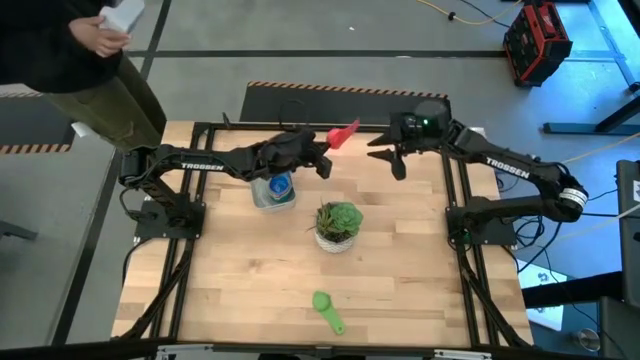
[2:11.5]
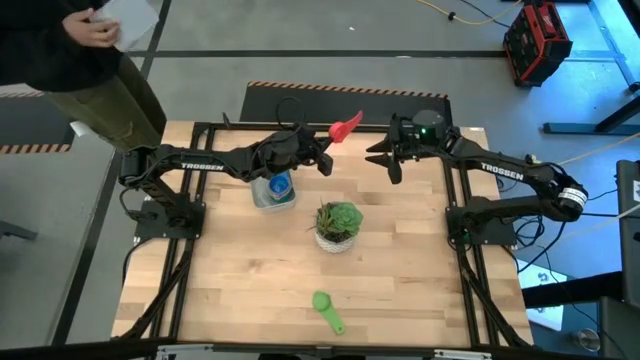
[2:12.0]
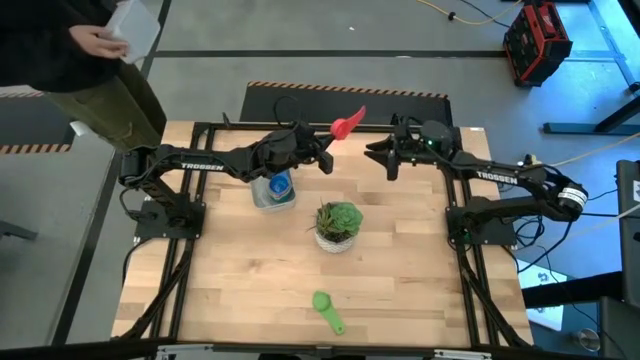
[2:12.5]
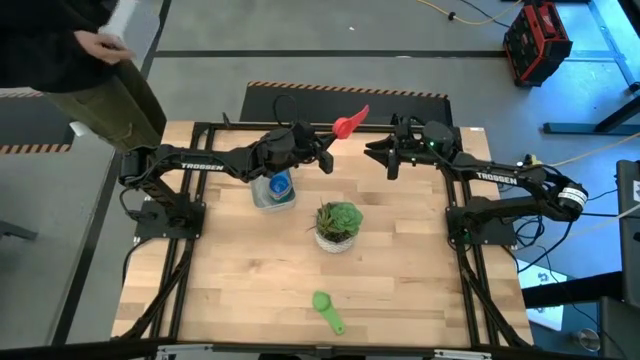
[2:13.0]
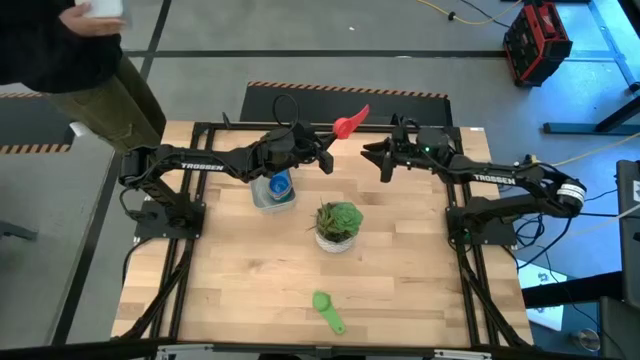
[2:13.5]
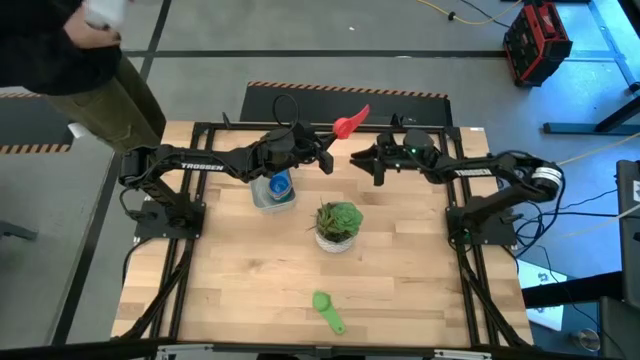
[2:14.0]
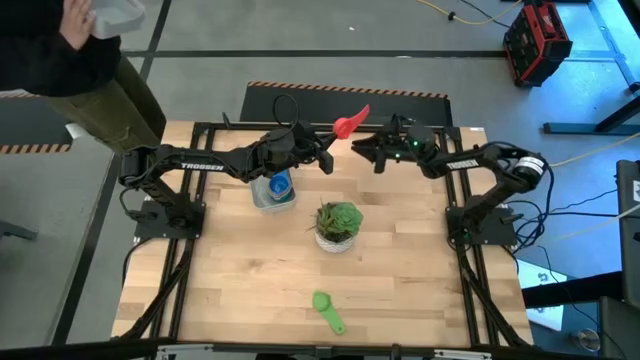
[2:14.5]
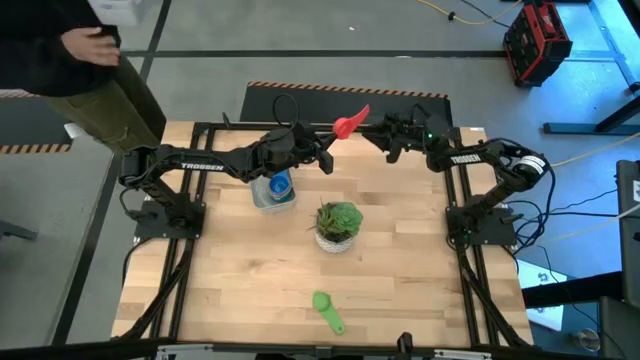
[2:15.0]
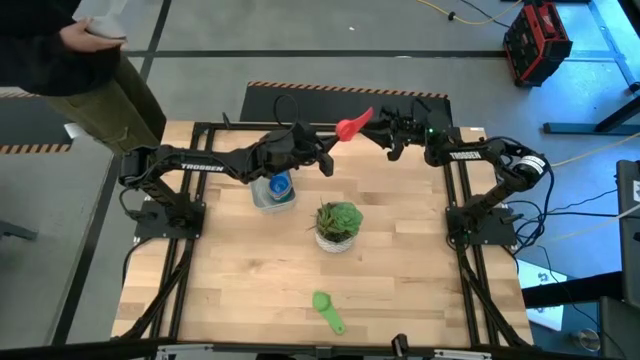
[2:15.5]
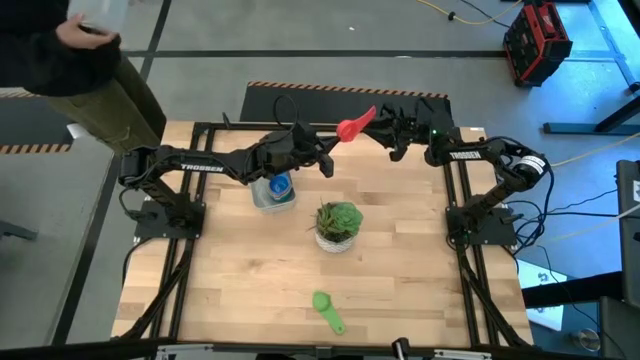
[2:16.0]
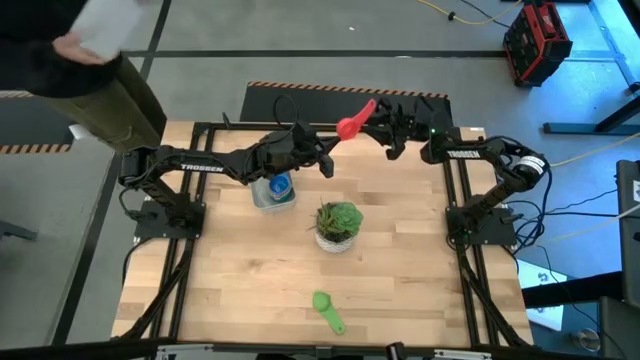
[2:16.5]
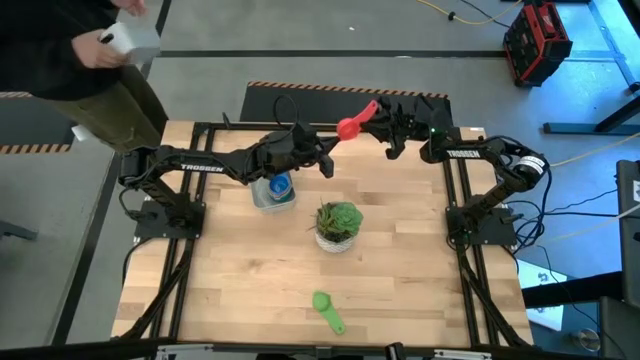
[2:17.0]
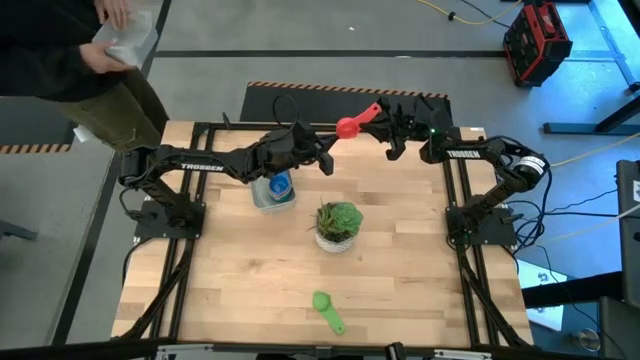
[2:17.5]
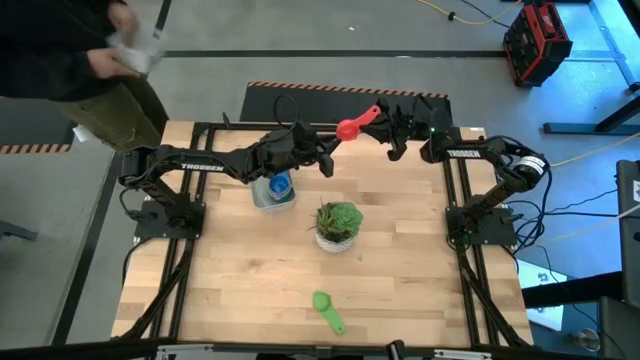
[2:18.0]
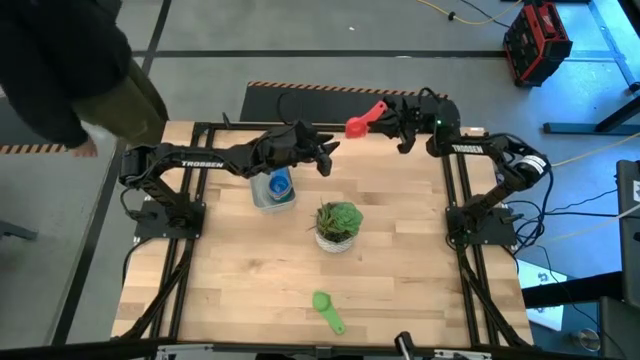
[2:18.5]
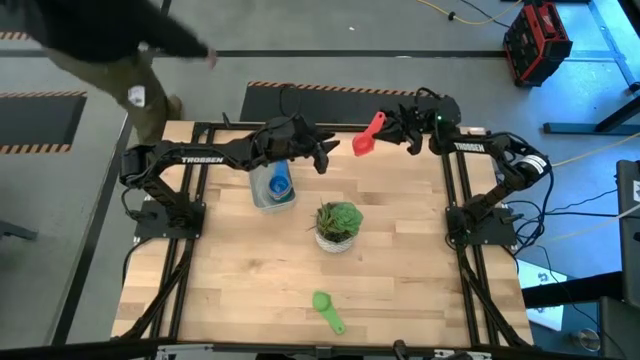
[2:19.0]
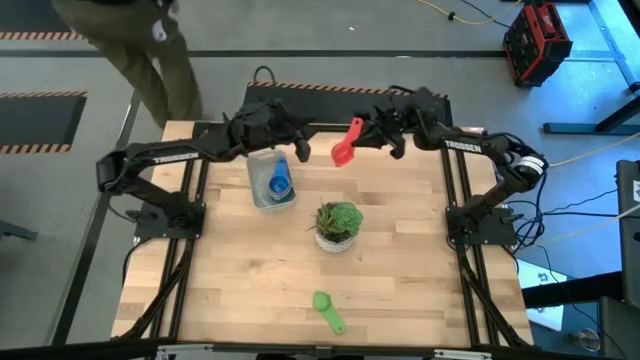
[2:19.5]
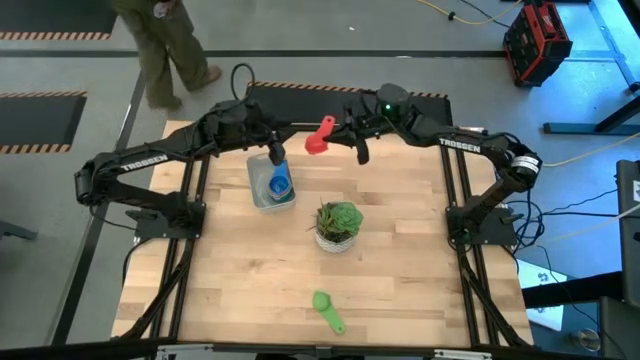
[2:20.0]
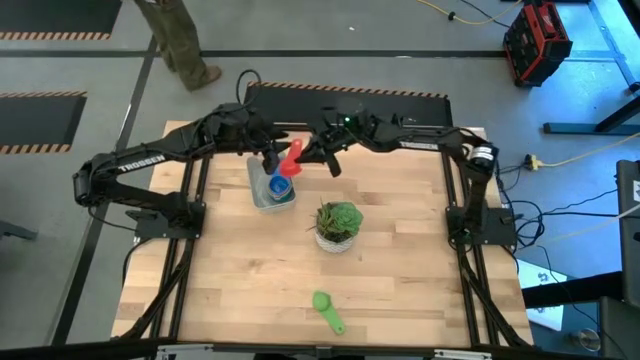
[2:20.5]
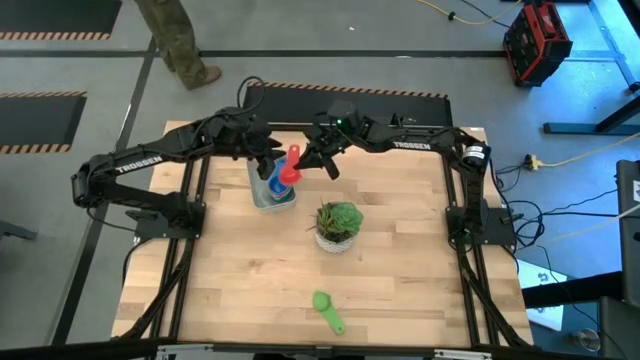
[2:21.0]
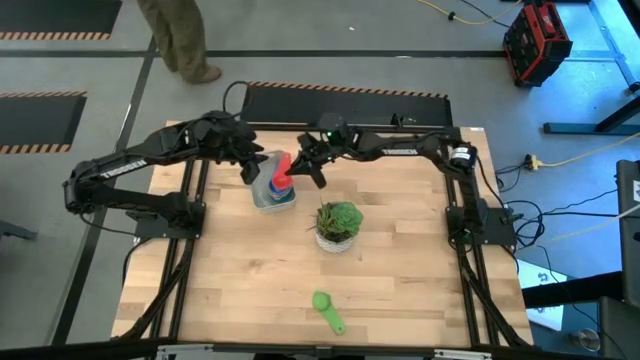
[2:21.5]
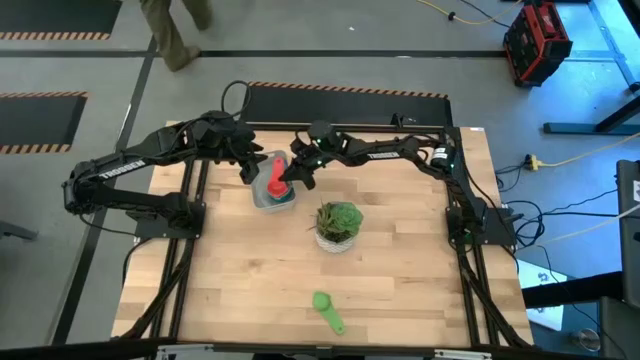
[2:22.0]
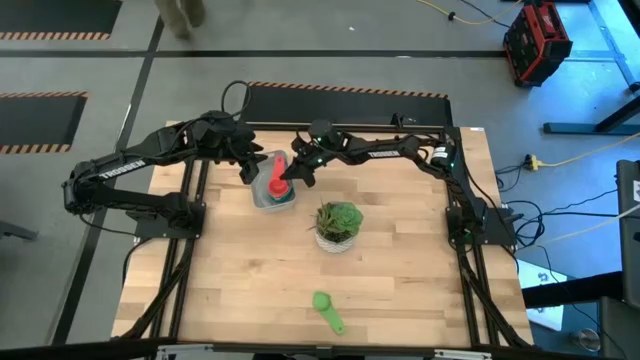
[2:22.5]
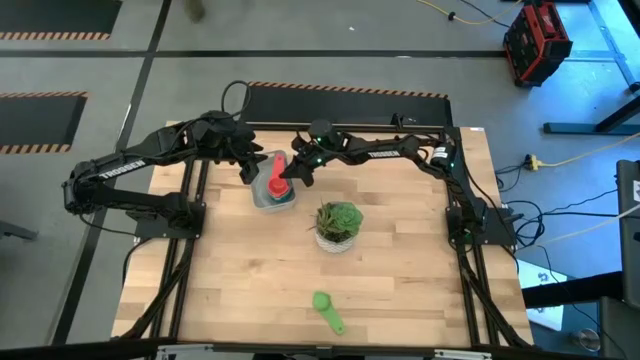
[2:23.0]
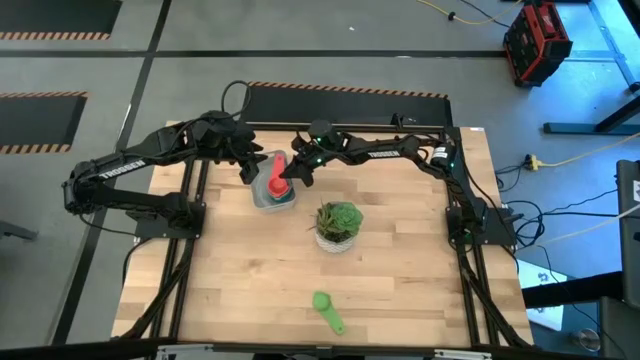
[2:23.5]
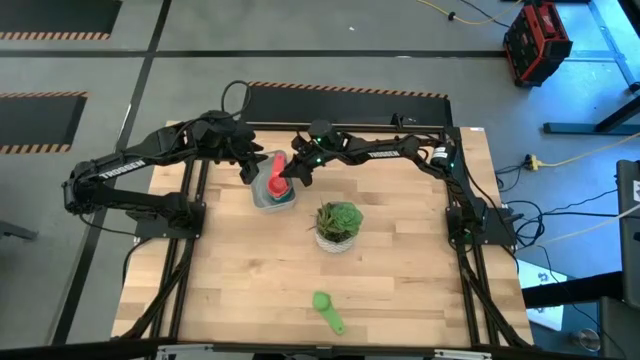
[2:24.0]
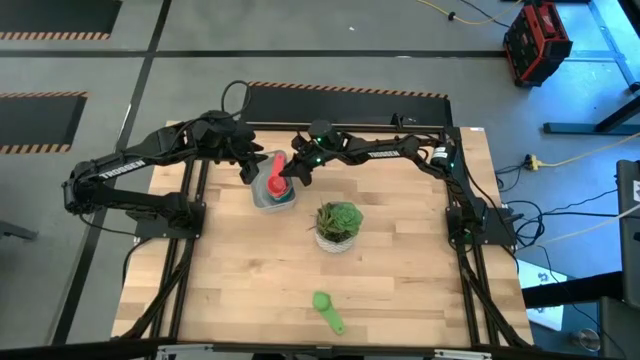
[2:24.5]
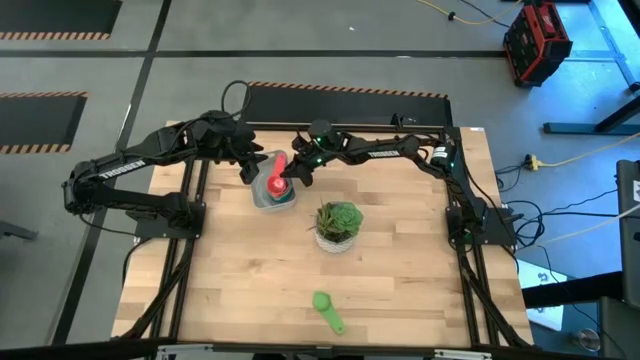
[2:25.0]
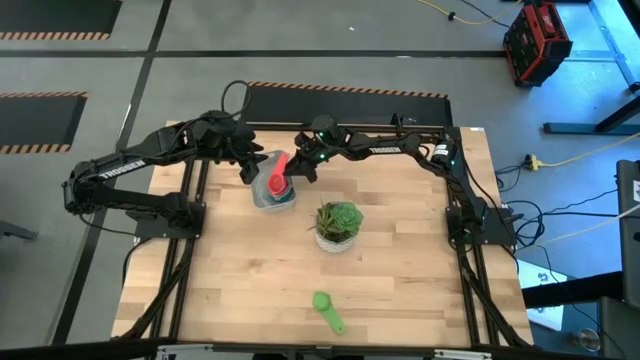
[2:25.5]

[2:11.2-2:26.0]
Task: Nest measuring cups in basket
Stack the red measuring cup on top of the blue measuring cup in the gray bin

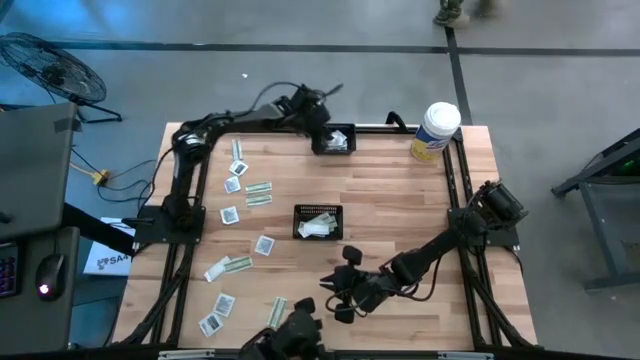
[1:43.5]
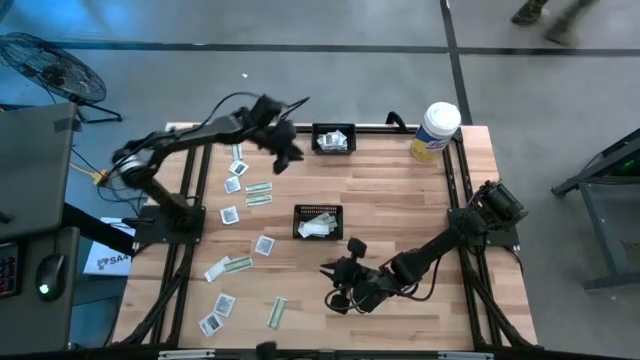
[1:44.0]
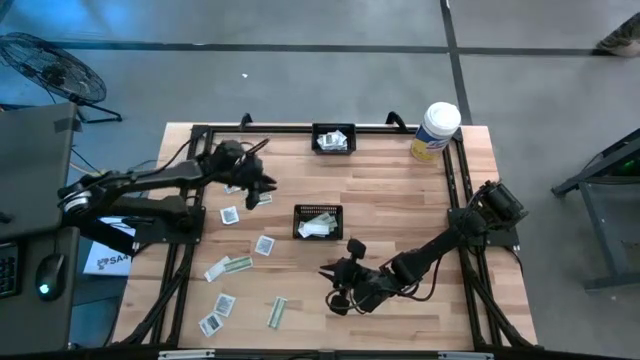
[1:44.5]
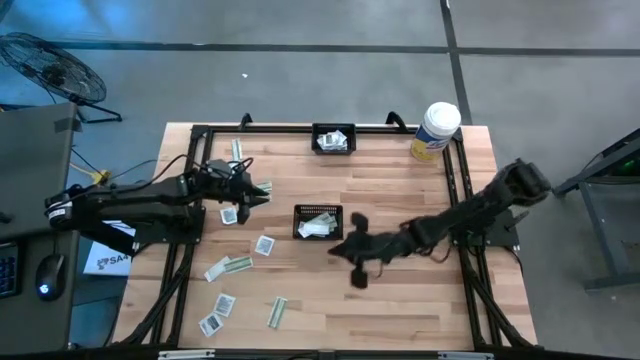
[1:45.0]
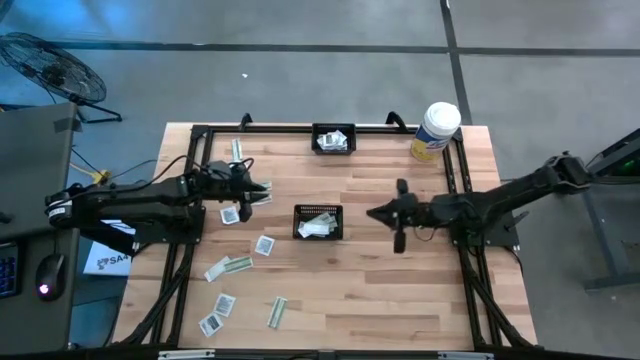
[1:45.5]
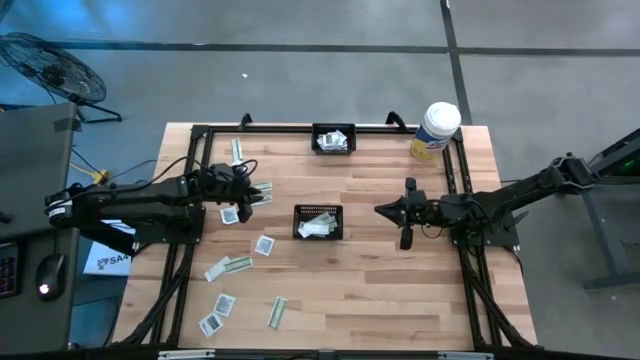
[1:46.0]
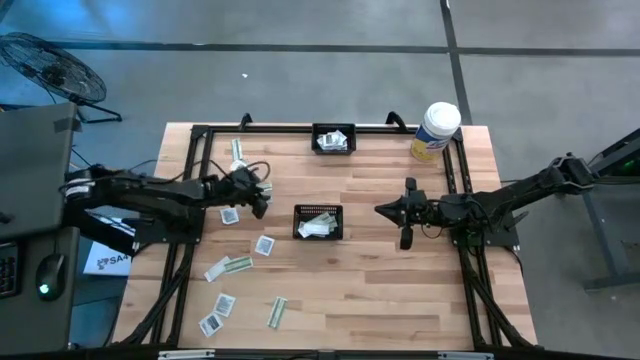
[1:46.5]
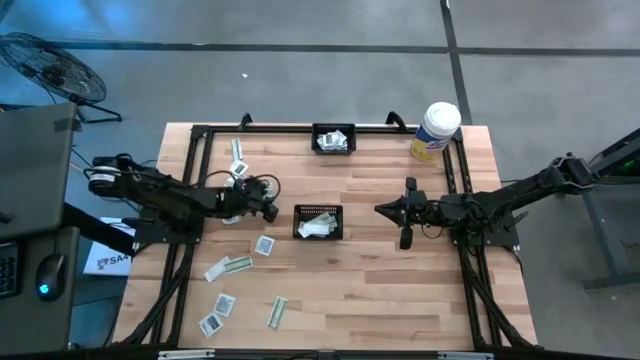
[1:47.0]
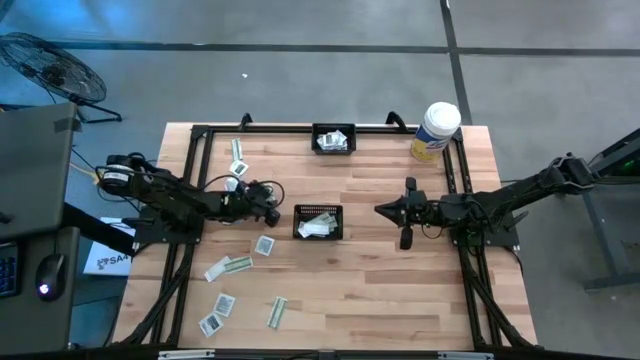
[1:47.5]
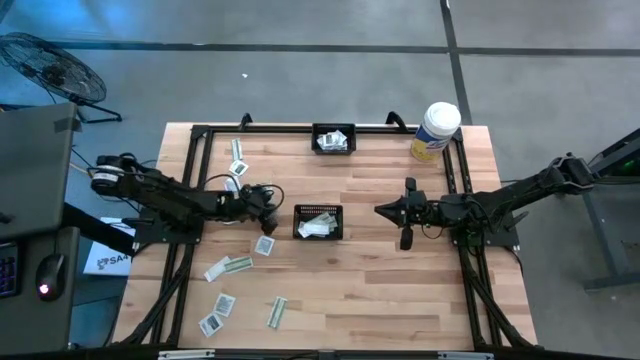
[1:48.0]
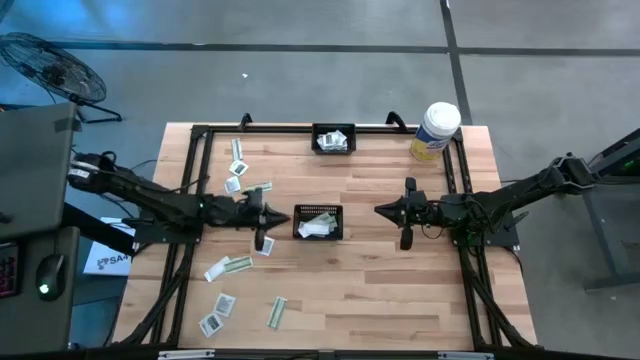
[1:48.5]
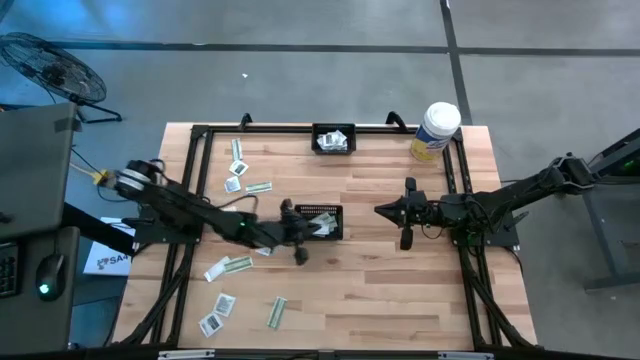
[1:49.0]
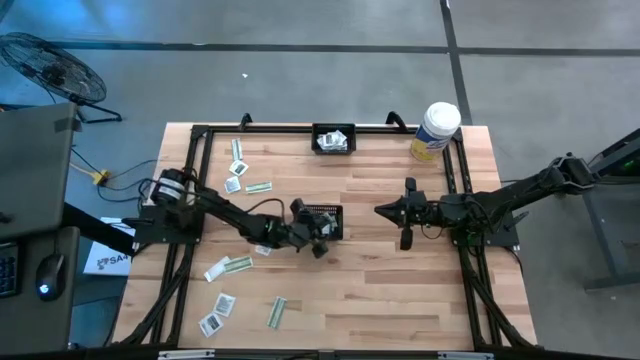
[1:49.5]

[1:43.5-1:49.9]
Task: Pick & Place First Aid Supplies
Put the bandage into the bottom black basket
